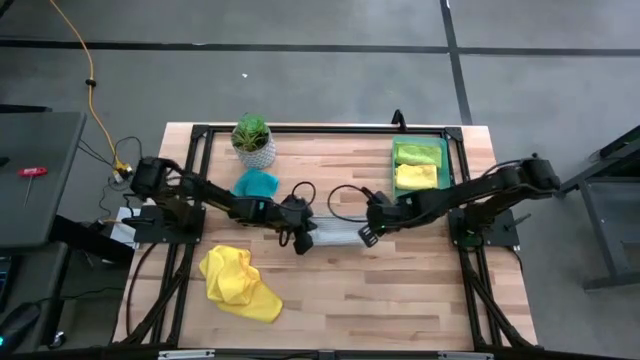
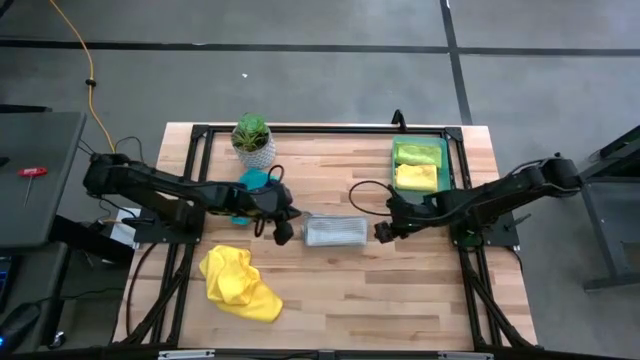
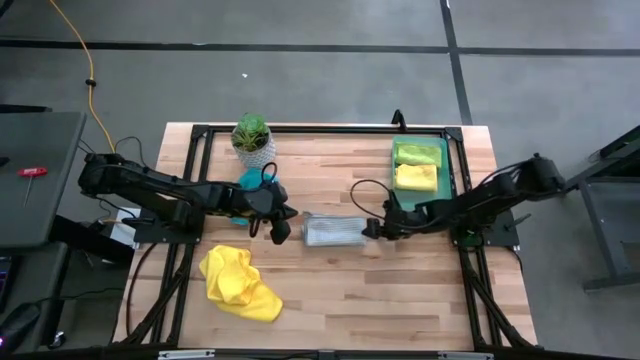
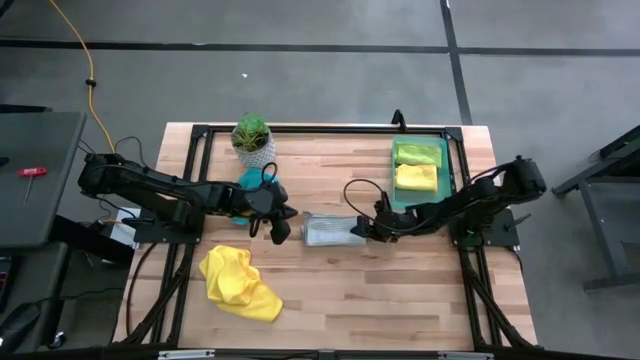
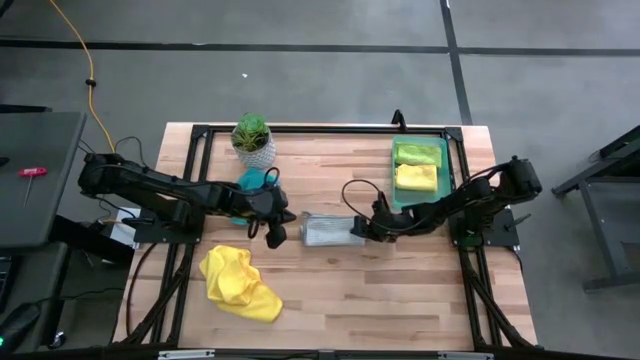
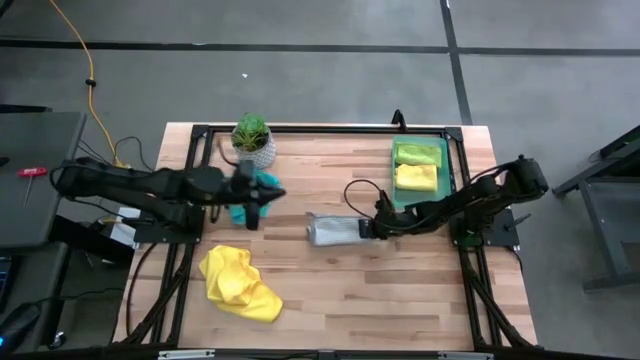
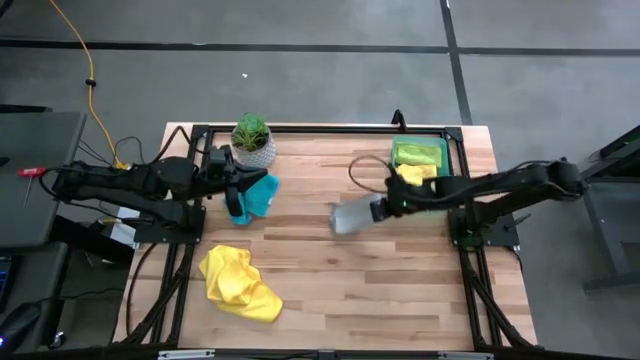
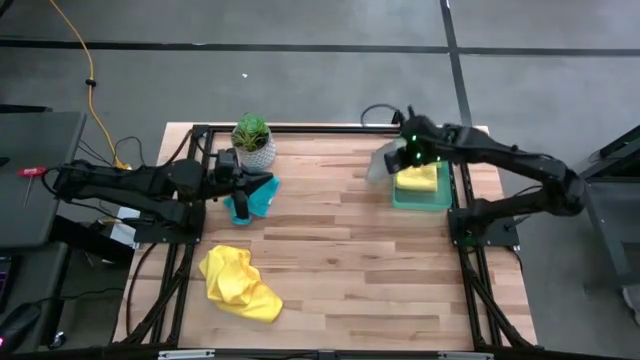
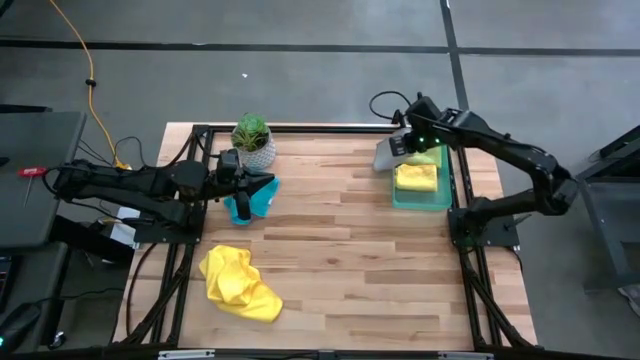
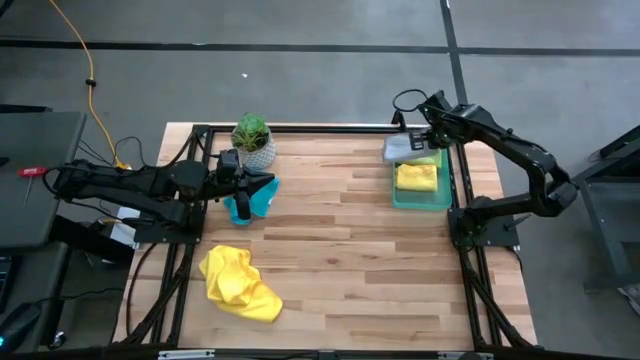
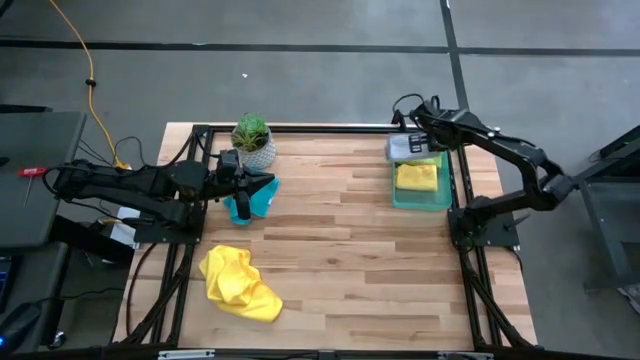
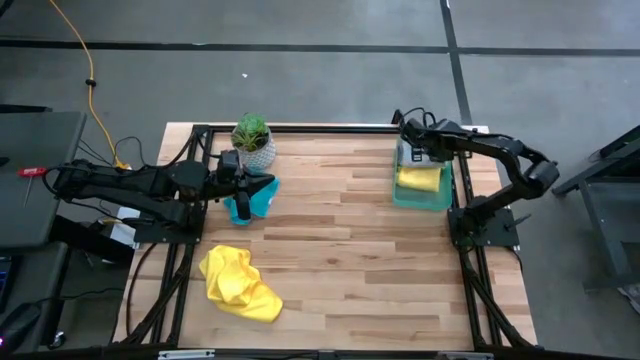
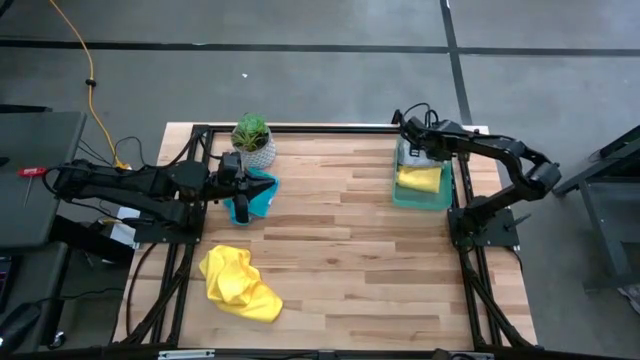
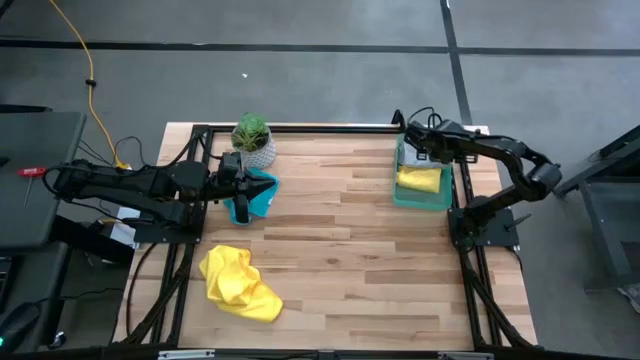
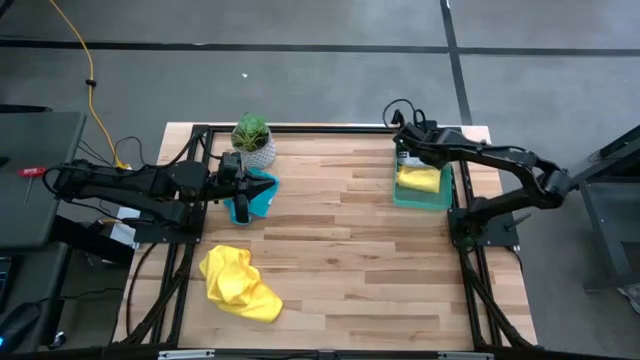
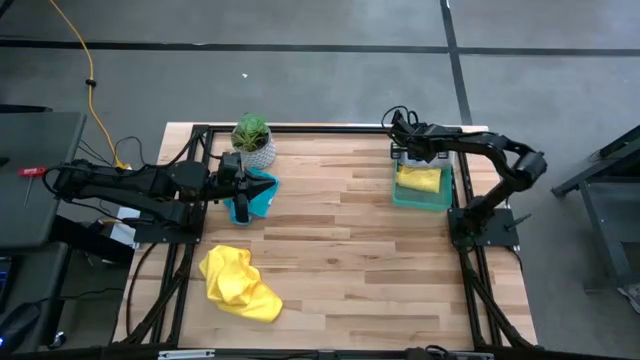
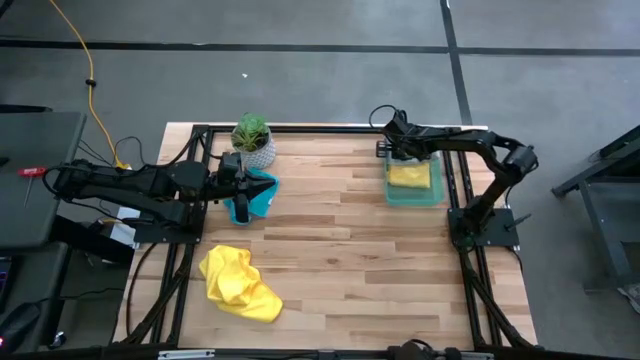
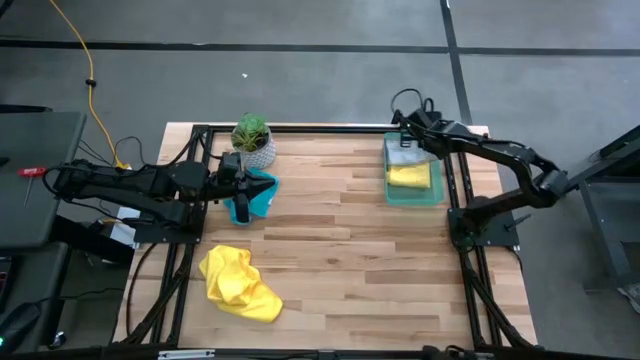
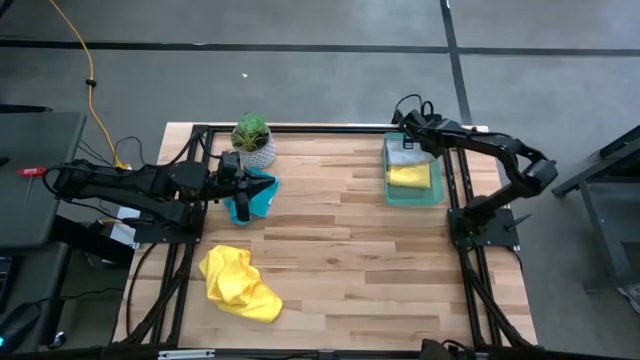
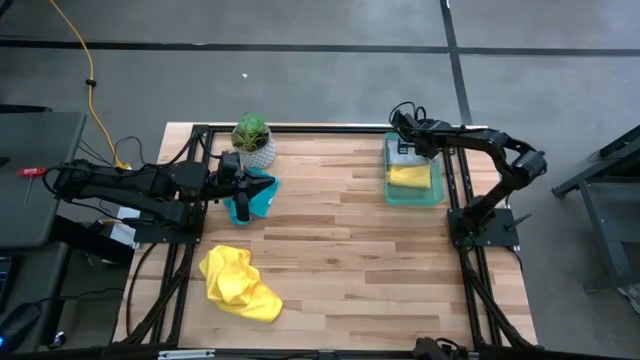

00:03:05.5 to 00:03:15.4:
Task: Fold microfiber towels
Put the folded gray microfiber cloth into the green bin

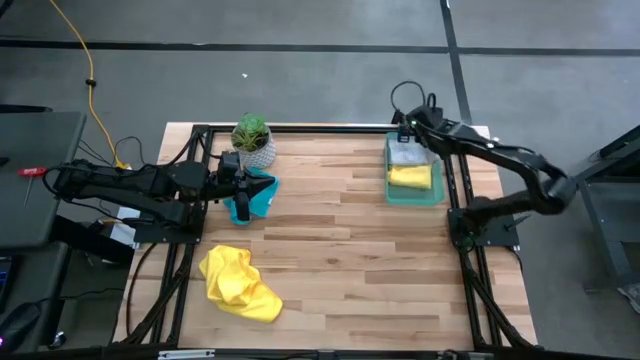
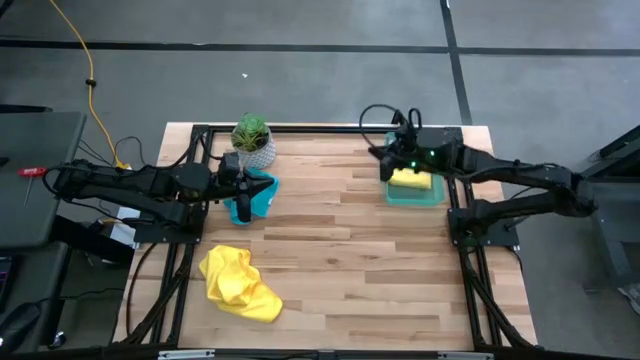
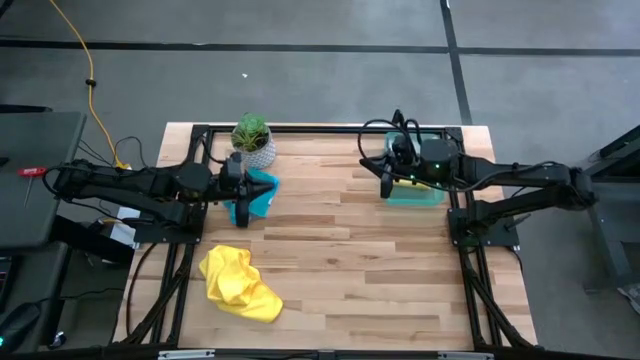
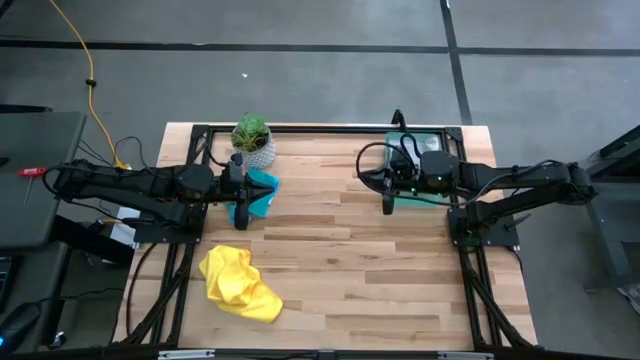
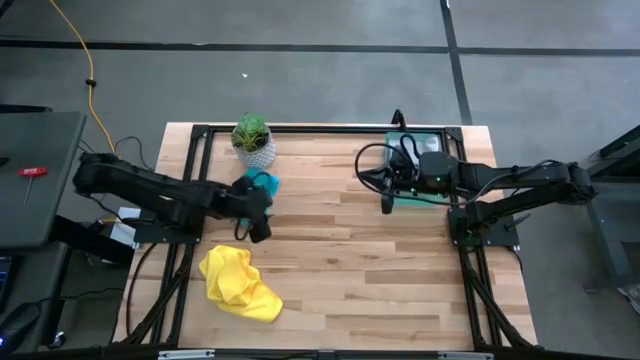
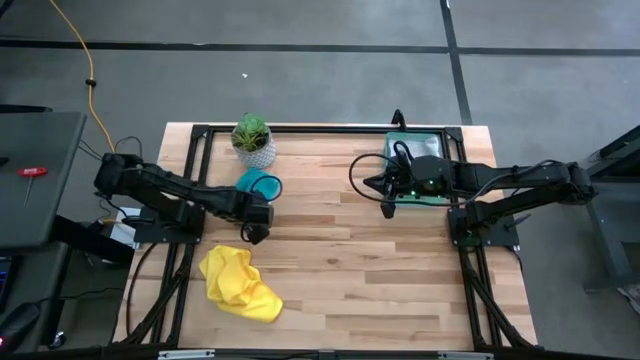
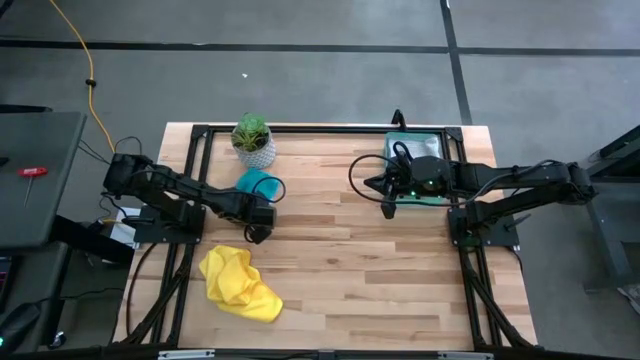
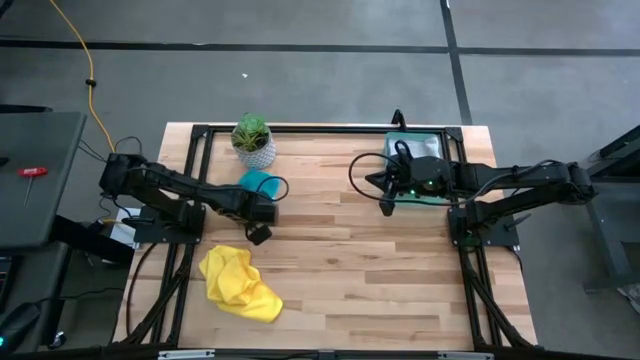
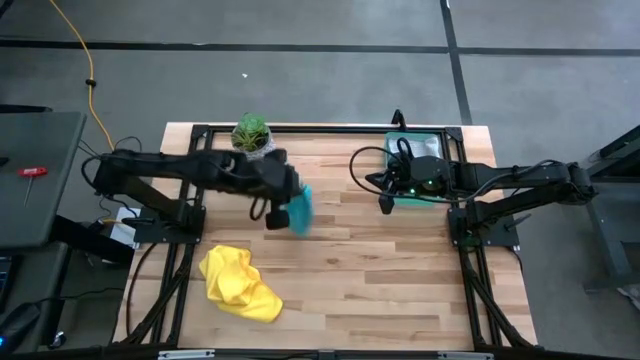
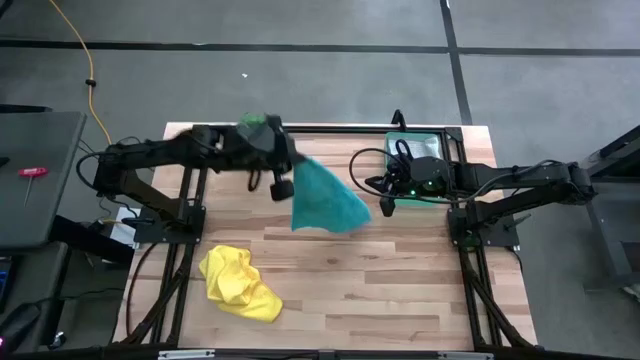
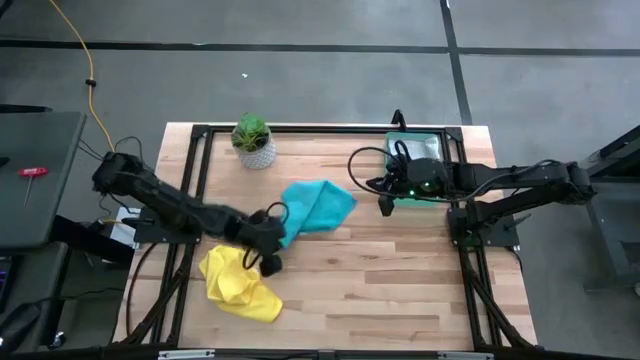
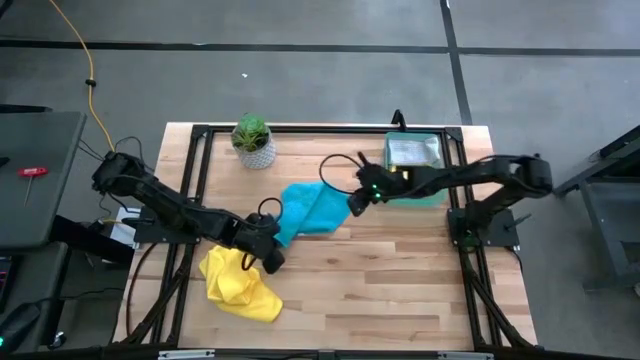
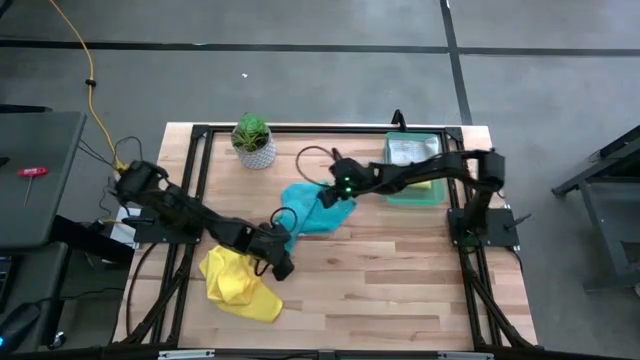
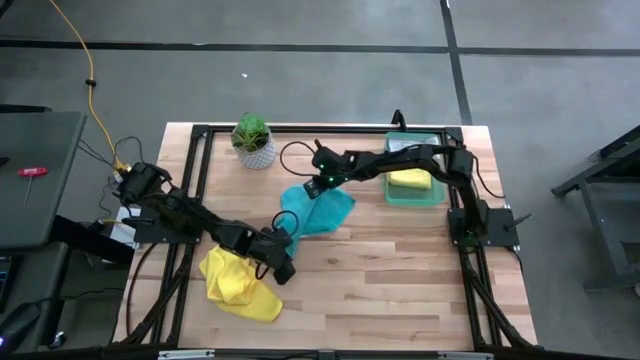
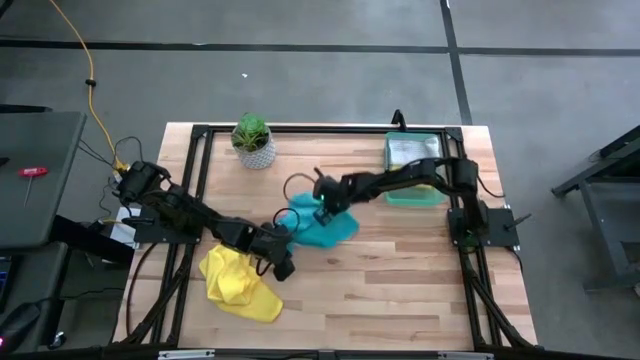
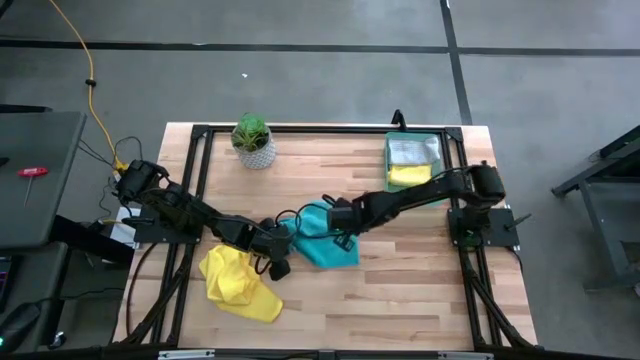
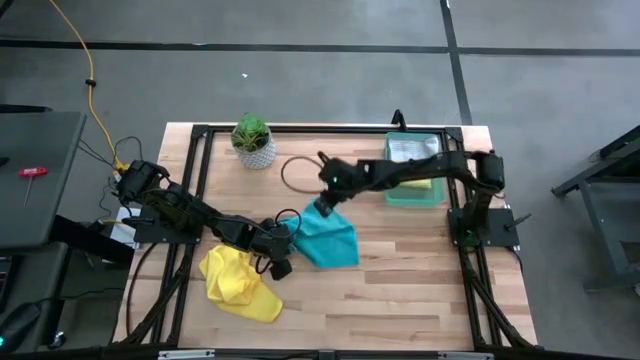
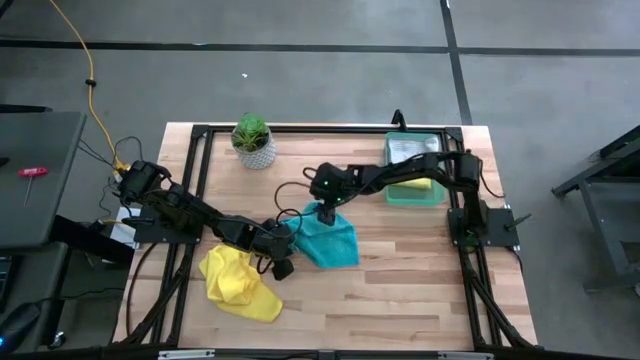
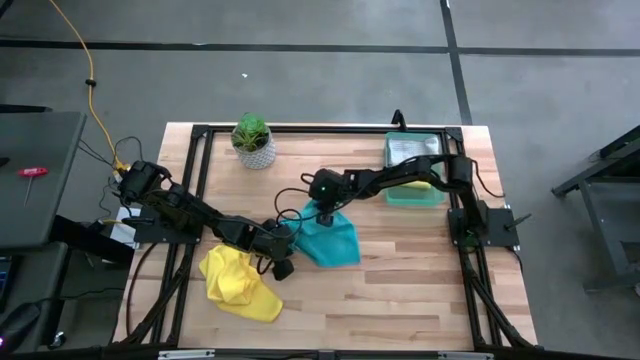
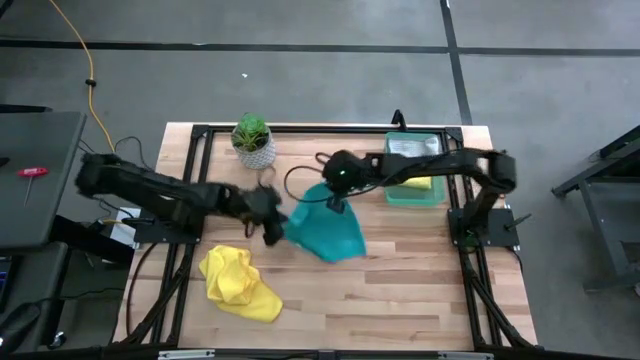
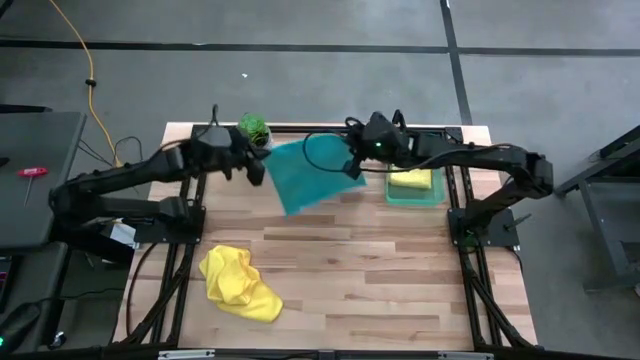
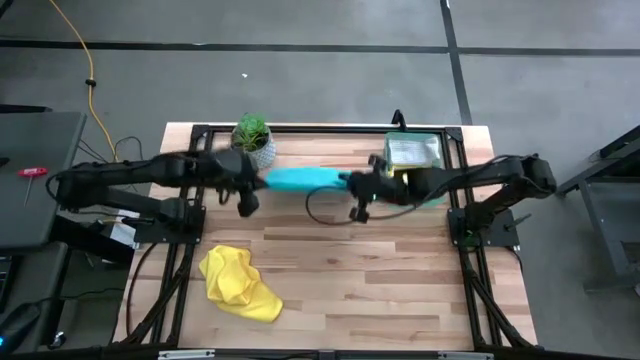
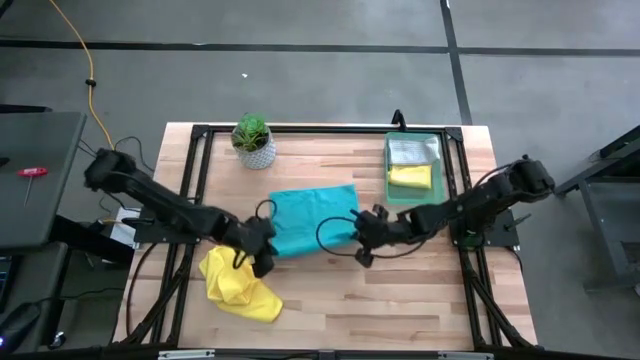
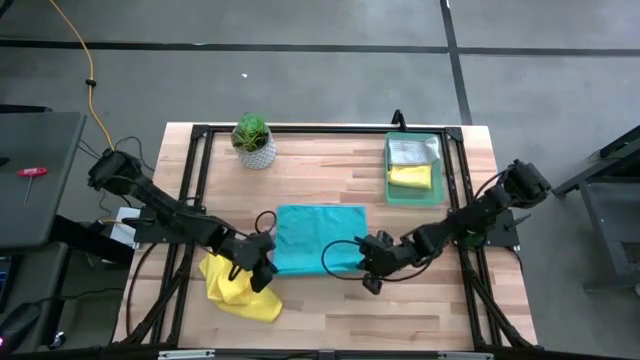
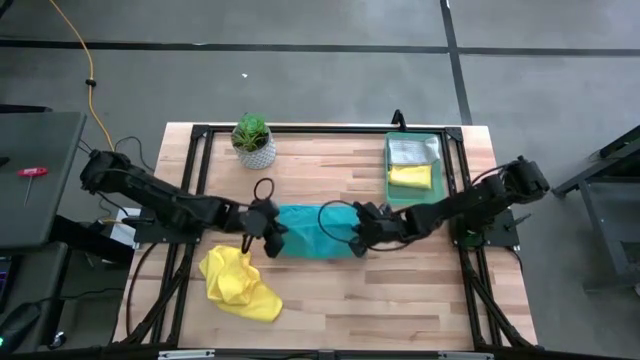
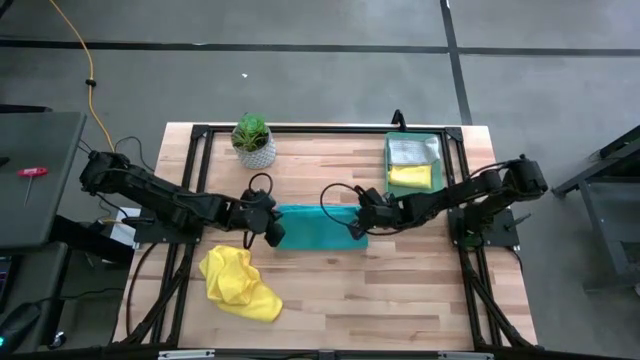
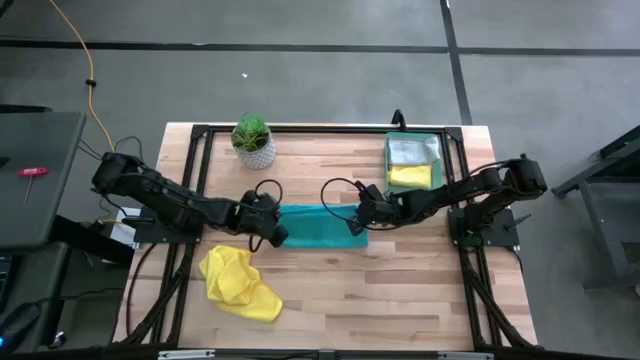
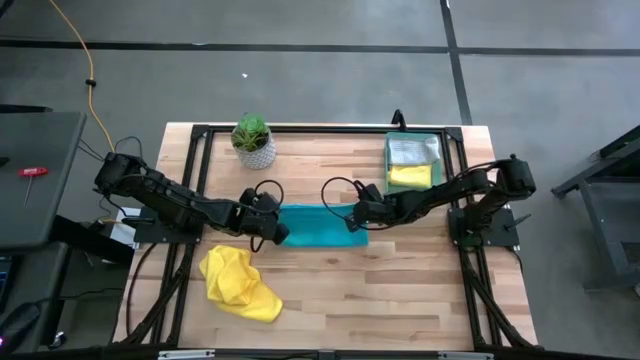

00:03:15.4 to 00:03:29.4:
Fold the blue microfiber cloth
